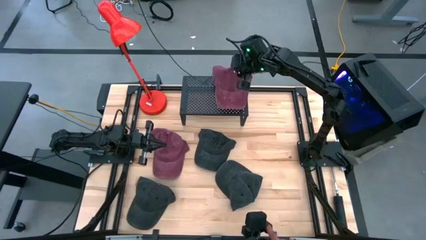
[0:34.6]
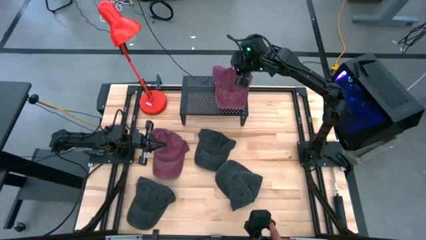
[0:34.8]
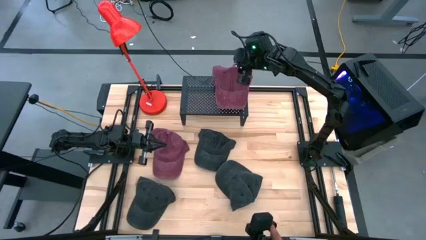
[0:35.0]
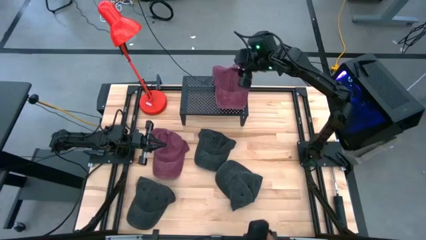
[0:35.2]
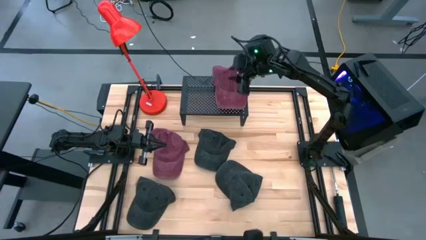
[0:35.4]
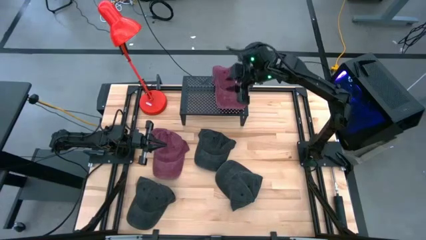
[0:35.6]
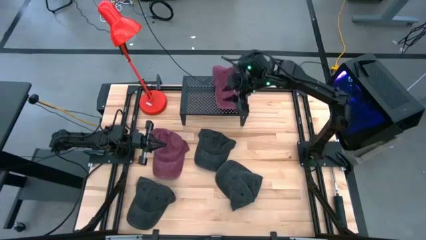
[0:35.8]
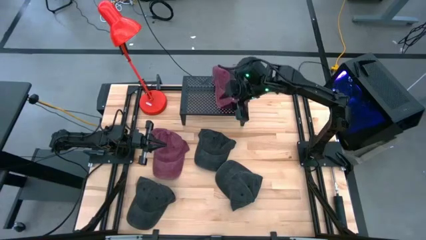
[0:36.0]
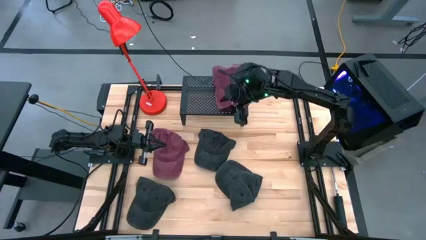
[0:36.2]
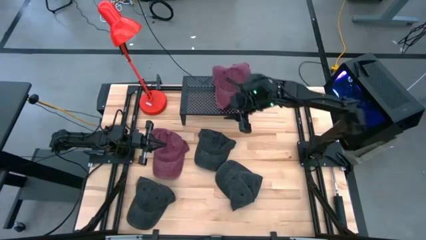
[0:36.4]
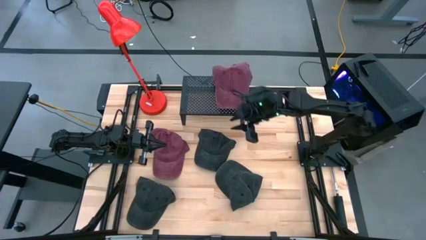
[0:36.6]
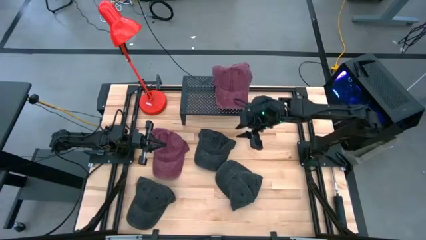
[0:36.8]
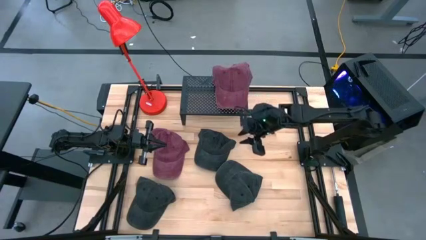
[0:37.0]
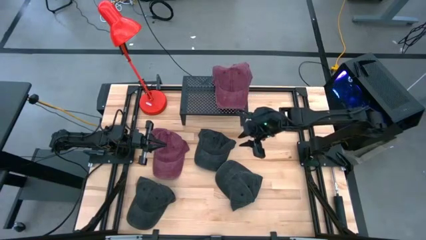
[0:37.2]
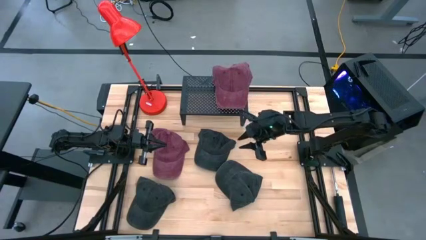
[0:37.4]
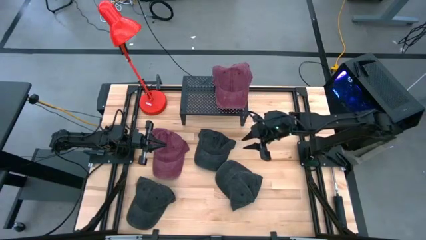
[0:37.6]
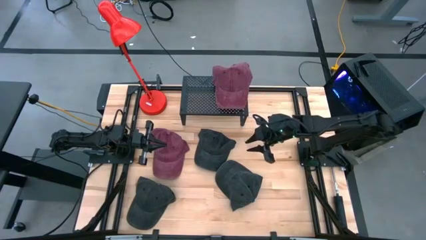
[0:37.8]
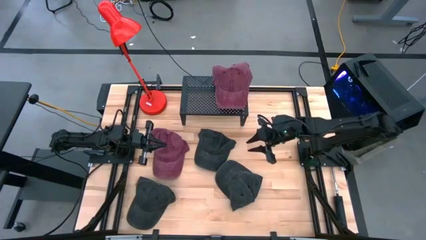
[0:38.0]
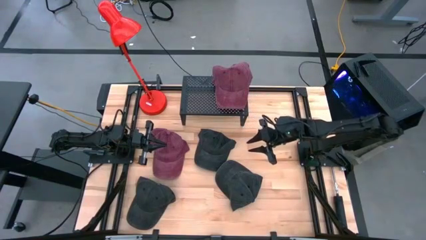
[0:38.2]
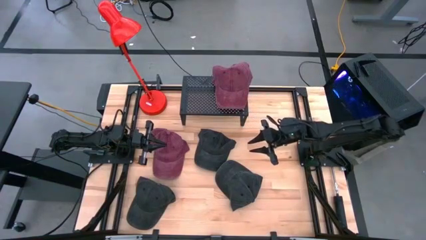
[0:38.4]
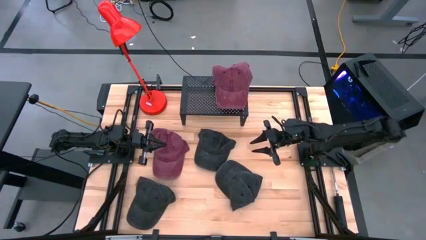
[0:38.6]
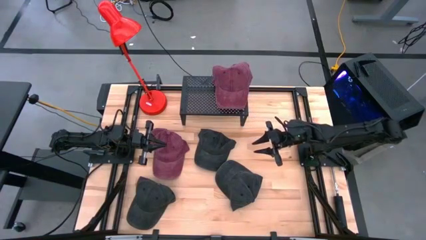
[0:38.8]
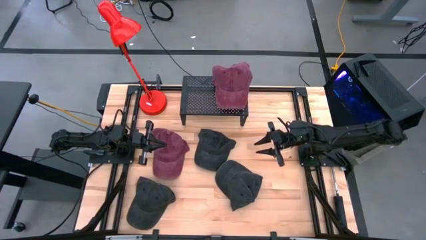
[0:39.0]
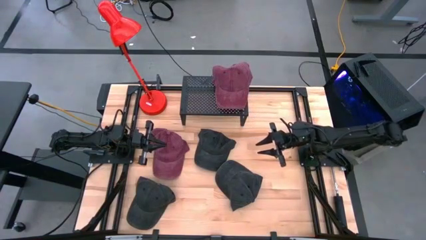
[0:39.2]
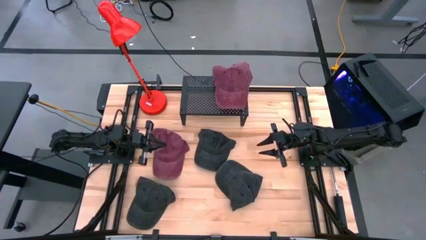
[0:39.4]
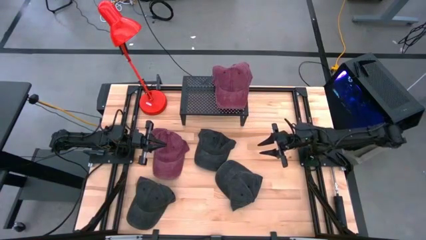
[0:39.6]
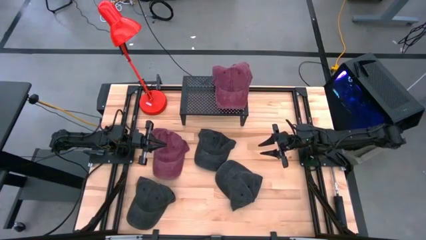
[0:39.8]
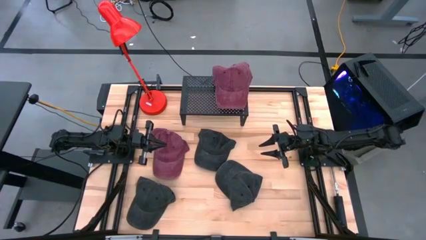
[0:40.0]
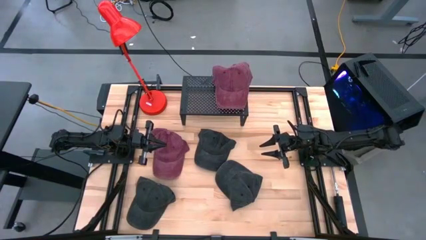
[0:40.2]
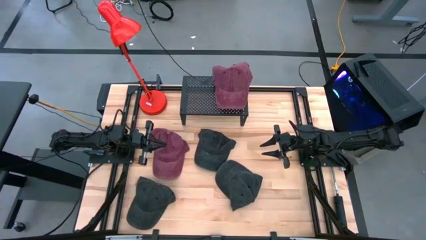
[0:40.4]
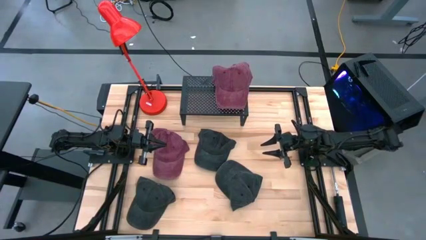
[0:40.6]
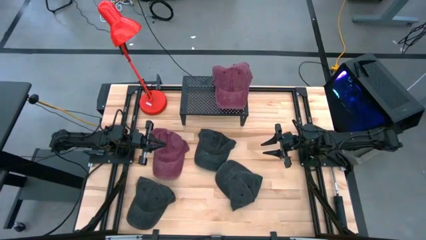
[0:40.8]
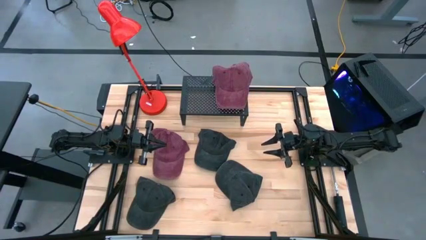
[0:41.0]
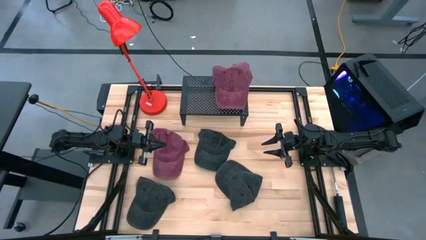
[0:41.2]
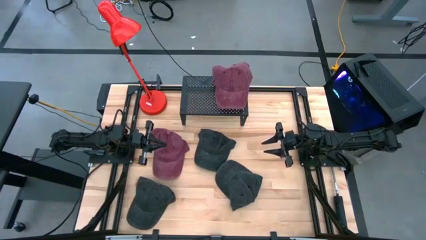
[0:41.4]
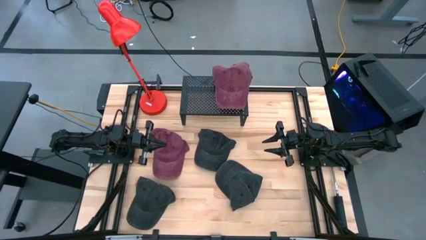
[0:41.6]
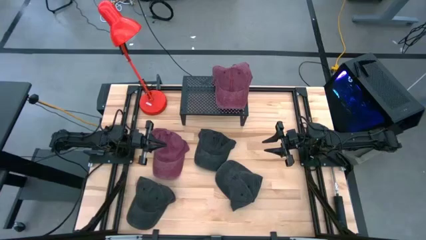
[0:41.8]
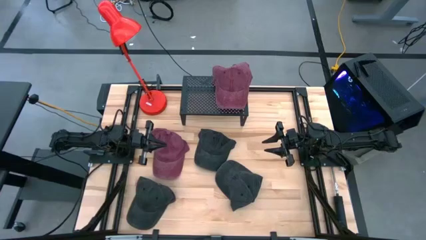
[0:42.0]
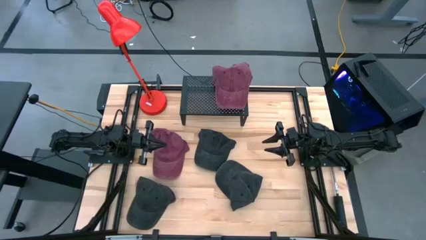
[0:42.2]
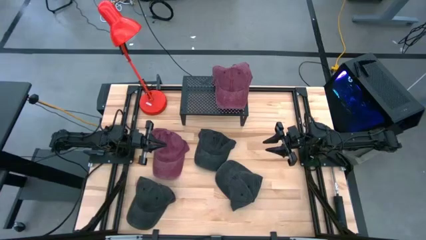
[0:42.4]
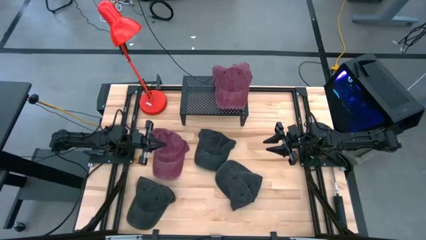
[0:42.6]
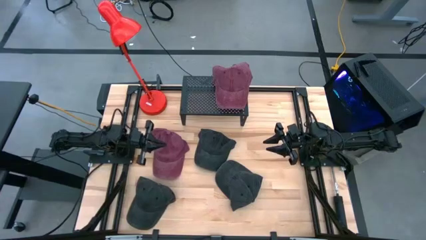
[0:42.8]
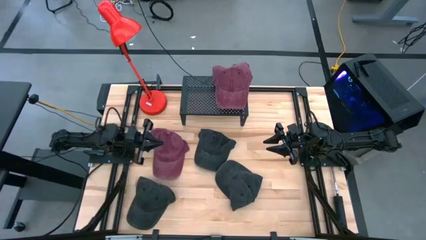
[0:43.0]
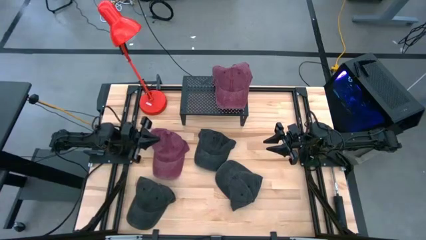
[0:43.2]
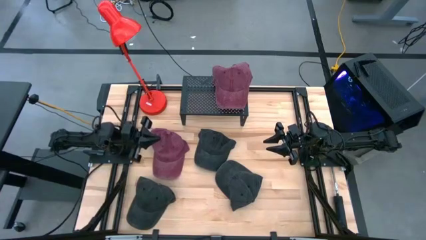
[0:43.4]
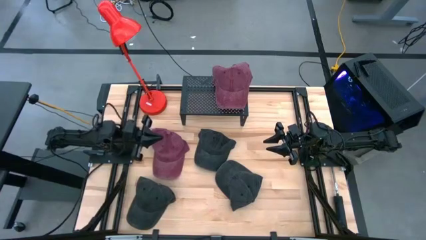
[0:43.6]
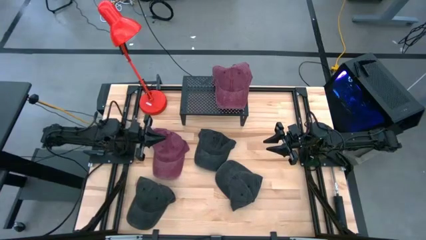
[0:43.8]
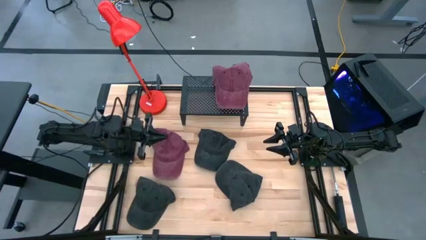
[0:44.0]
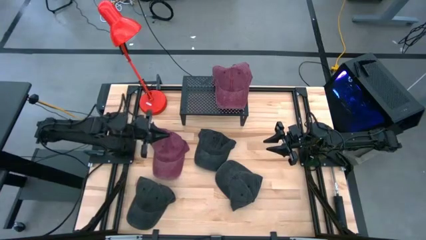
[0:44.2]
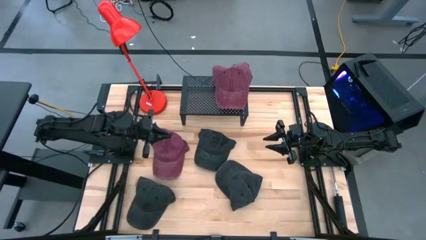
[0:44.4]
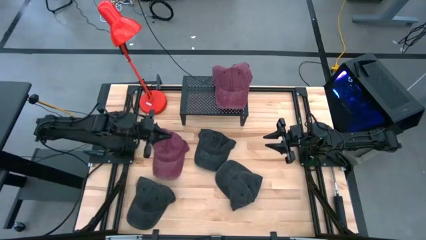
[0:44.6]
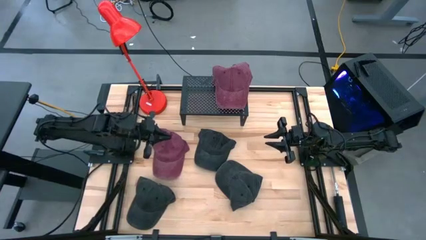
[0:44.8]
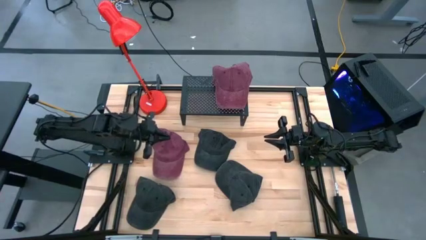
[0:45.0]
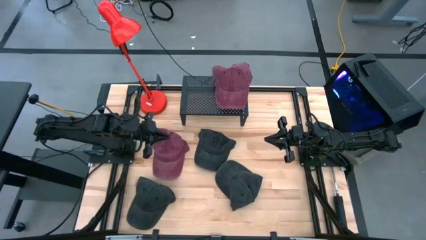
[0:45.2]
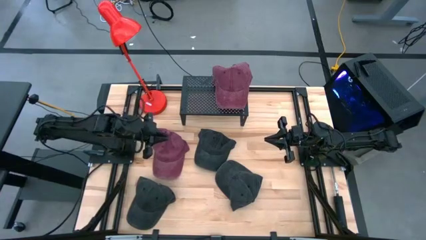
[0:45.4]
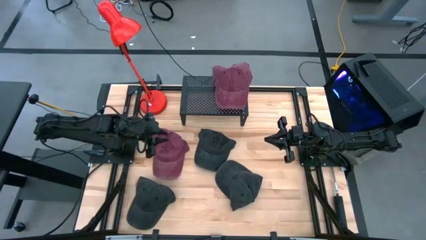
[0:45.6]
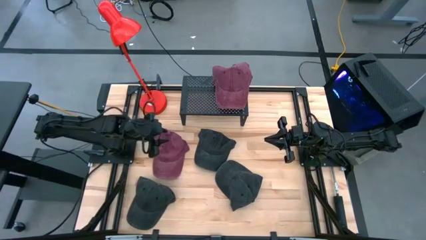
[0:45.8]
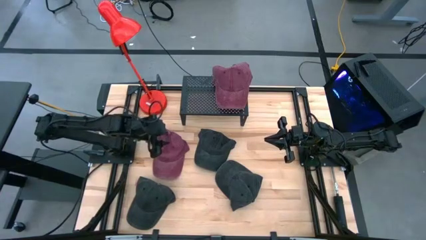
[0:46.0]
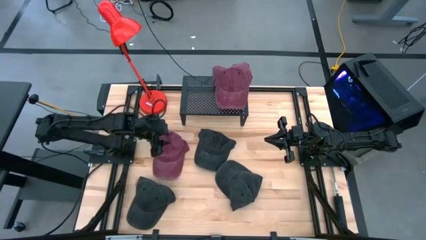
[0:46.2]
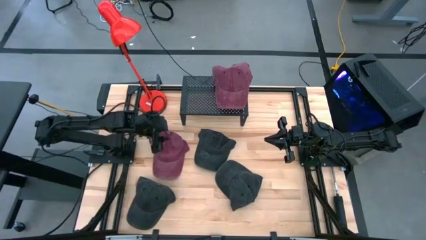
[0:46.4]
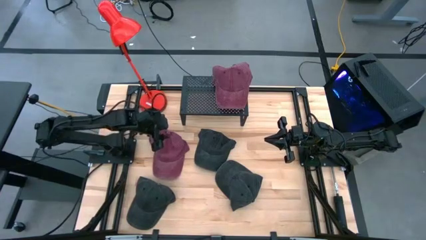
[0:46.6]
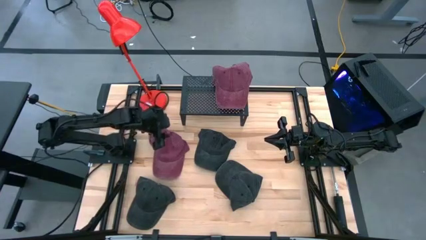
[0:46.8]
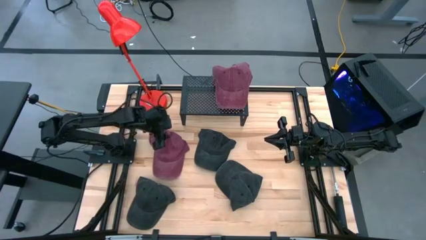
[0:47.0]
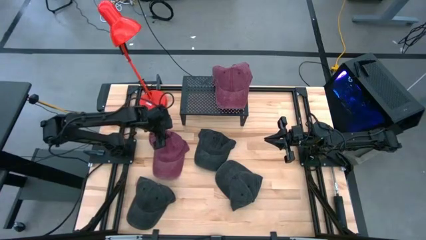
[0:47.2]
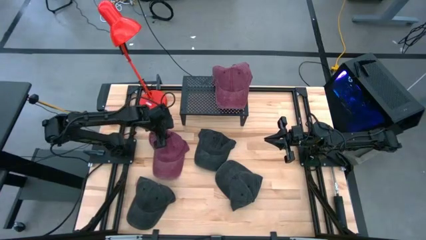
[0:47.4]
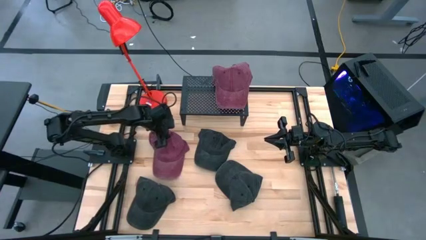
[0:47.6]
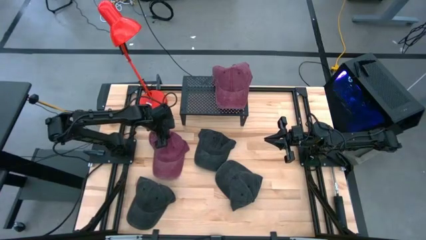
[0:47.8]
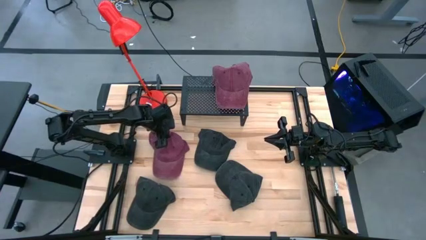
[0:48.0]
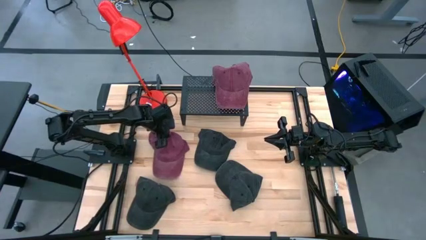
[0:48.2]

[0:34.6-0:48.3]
Task: Pick & Place hat
Stack the red cap on top of the red cap on the shelf
